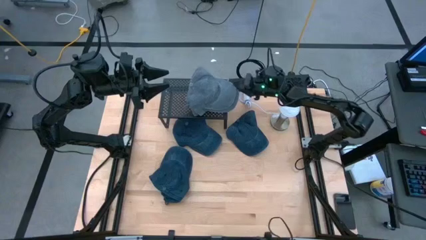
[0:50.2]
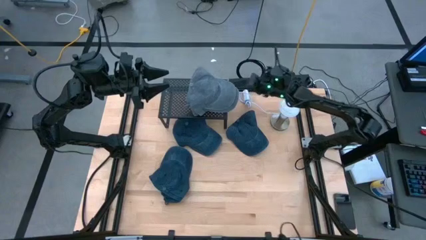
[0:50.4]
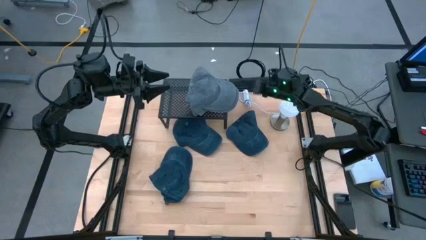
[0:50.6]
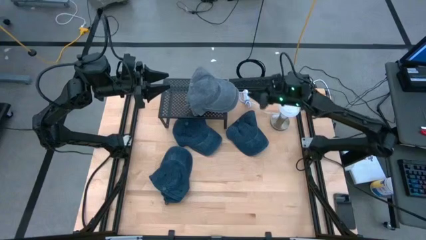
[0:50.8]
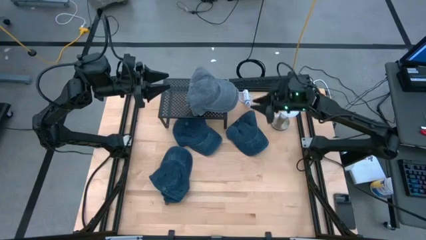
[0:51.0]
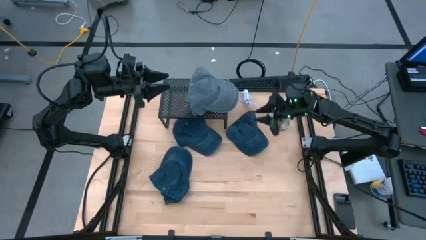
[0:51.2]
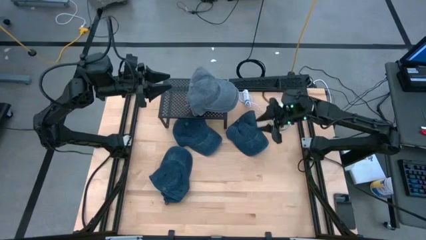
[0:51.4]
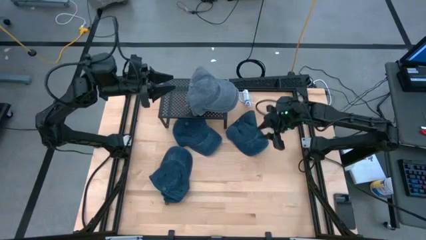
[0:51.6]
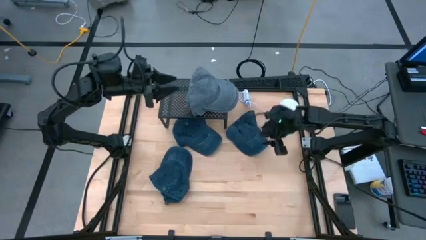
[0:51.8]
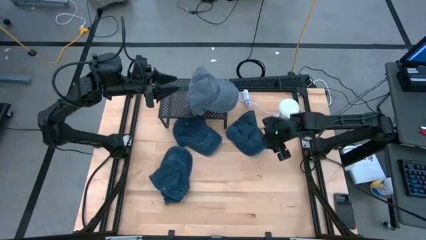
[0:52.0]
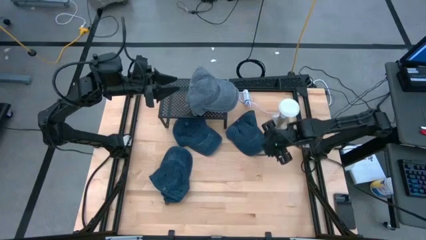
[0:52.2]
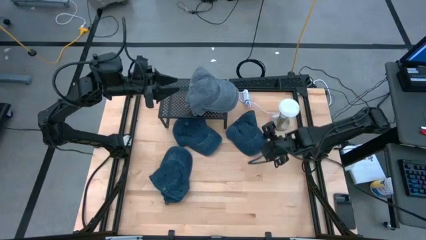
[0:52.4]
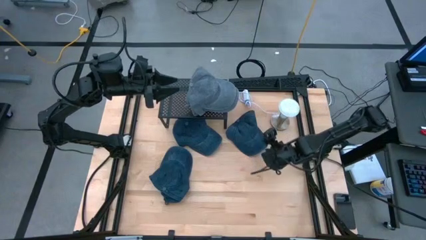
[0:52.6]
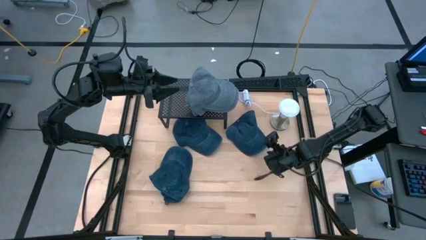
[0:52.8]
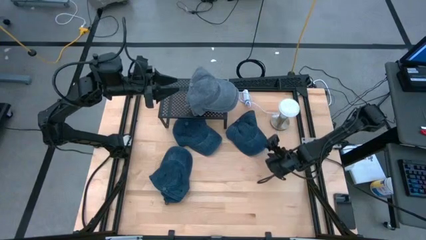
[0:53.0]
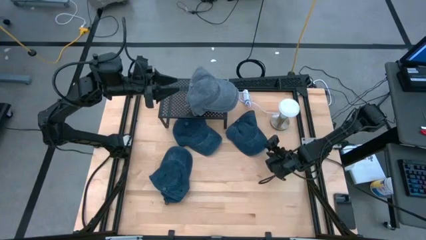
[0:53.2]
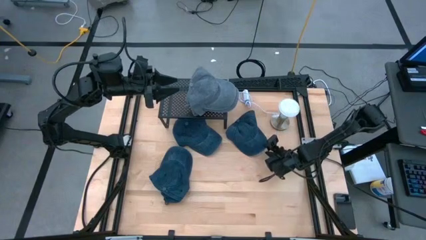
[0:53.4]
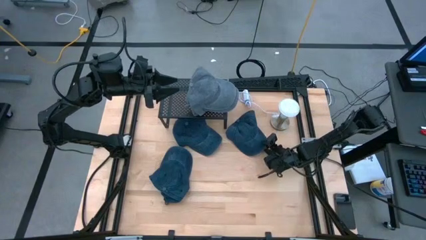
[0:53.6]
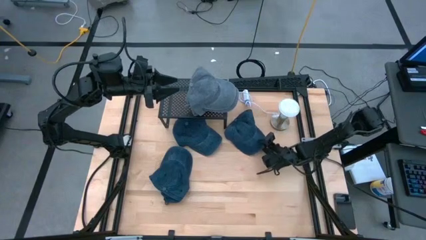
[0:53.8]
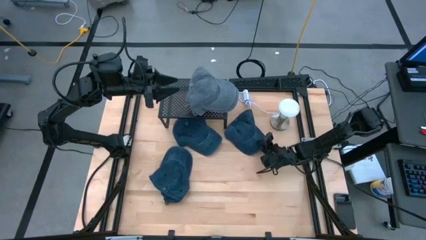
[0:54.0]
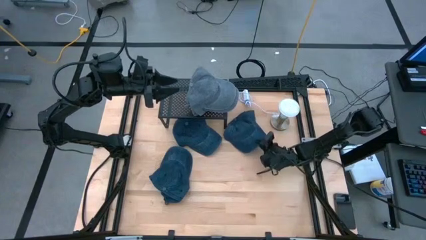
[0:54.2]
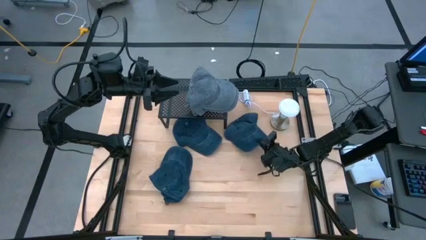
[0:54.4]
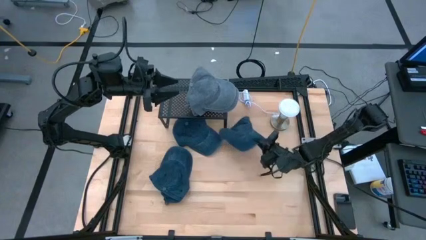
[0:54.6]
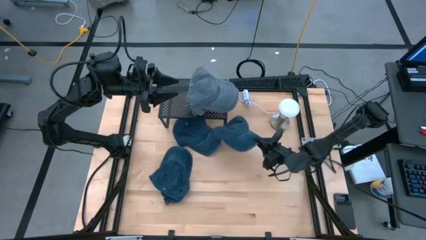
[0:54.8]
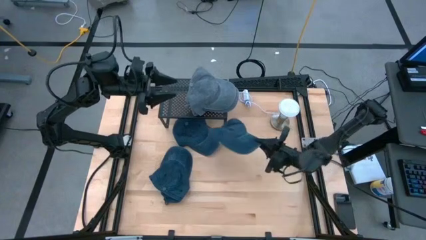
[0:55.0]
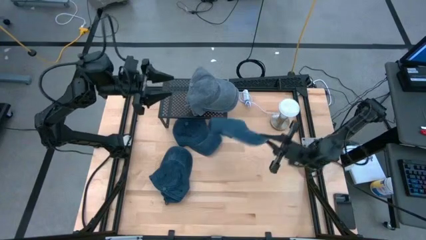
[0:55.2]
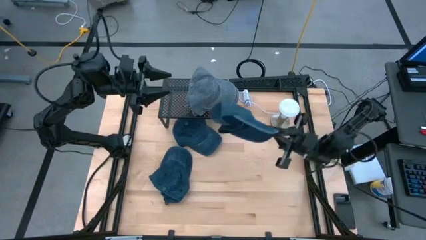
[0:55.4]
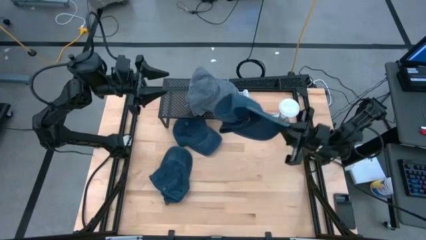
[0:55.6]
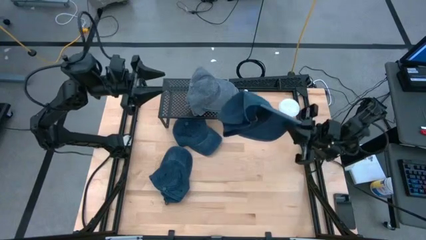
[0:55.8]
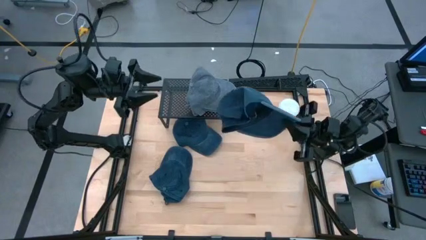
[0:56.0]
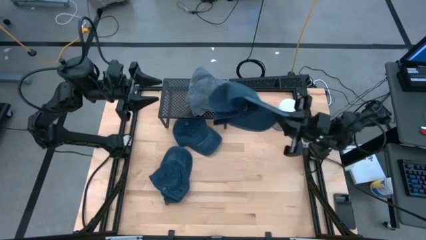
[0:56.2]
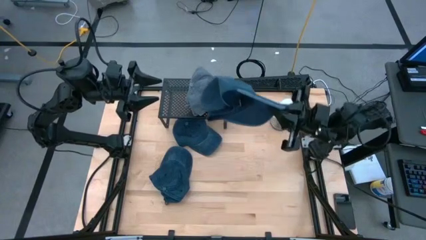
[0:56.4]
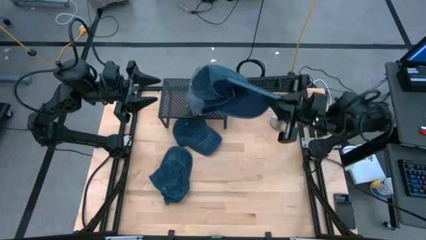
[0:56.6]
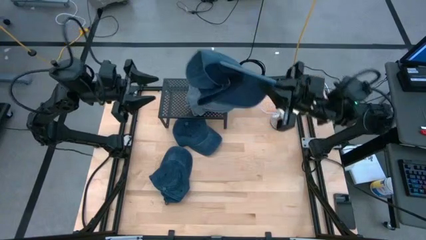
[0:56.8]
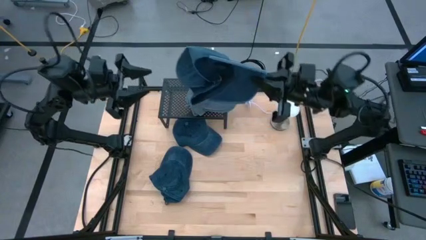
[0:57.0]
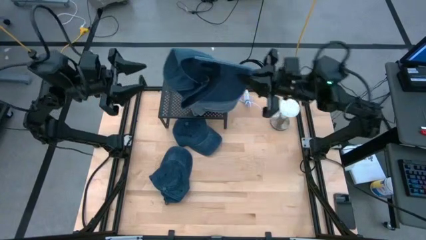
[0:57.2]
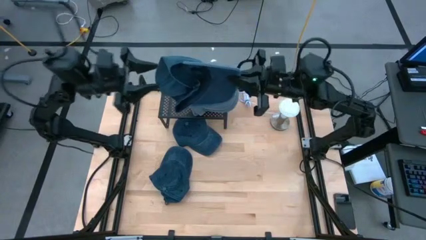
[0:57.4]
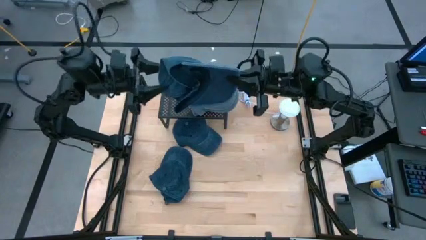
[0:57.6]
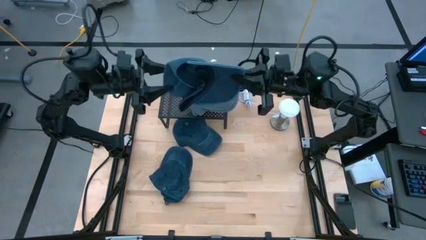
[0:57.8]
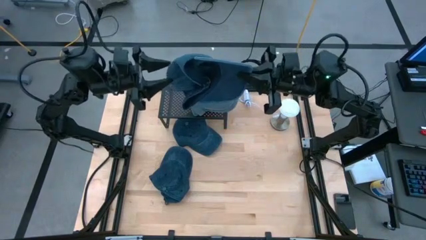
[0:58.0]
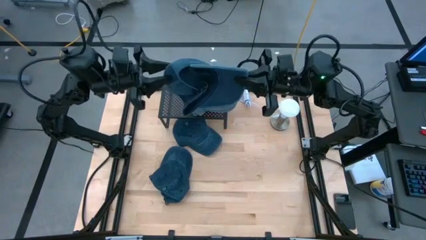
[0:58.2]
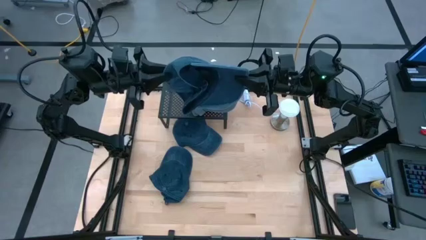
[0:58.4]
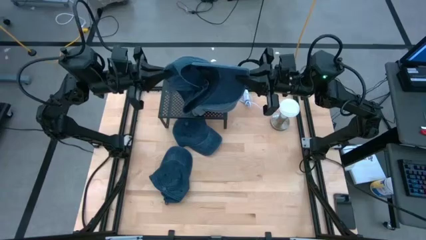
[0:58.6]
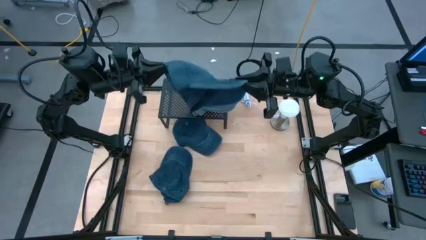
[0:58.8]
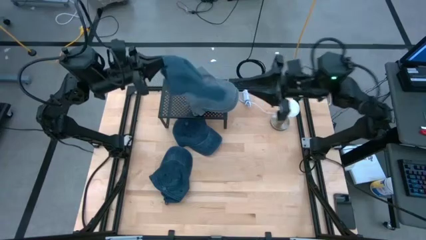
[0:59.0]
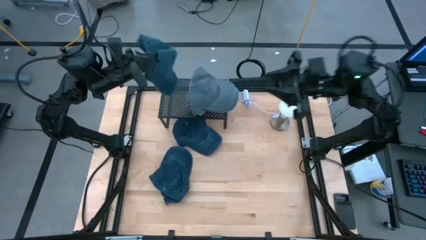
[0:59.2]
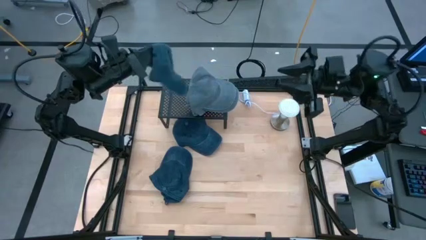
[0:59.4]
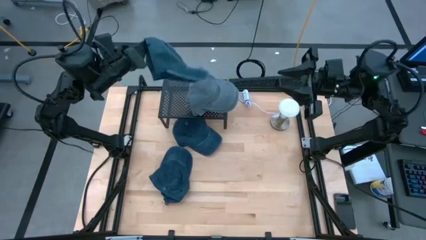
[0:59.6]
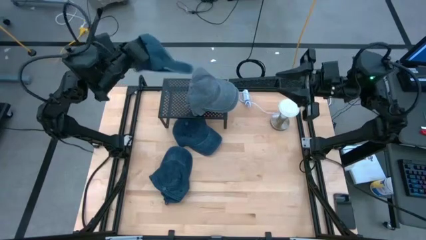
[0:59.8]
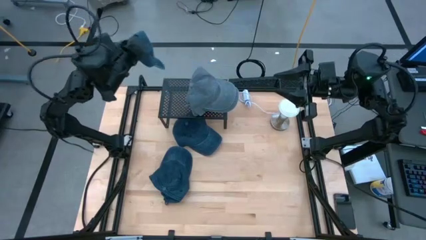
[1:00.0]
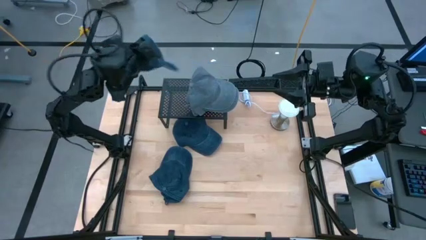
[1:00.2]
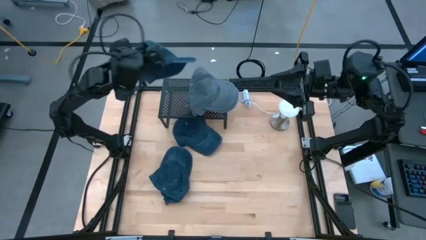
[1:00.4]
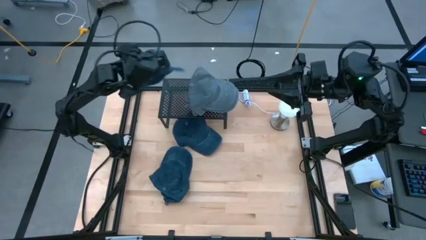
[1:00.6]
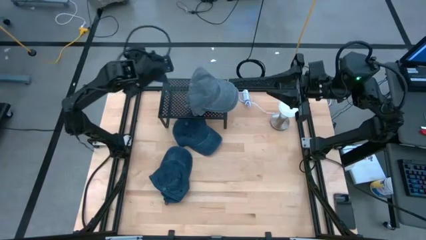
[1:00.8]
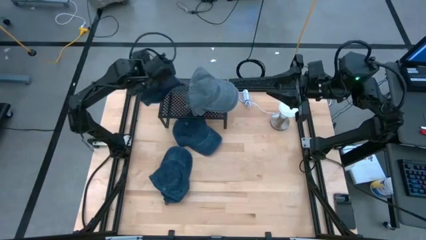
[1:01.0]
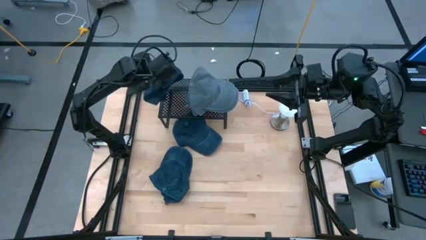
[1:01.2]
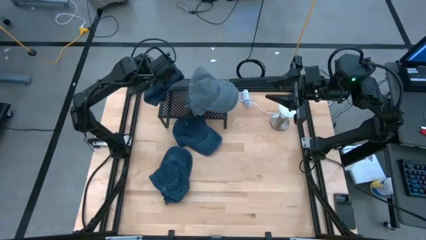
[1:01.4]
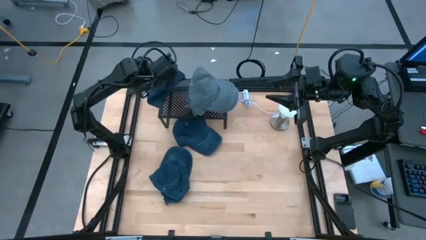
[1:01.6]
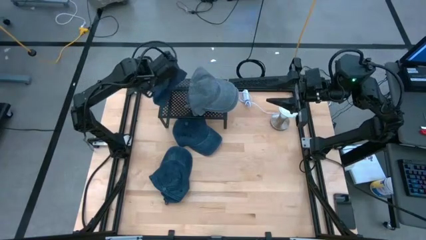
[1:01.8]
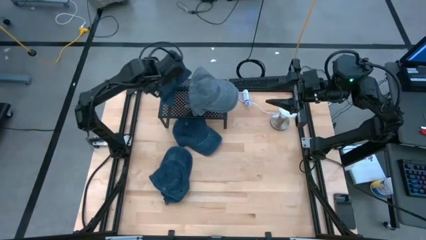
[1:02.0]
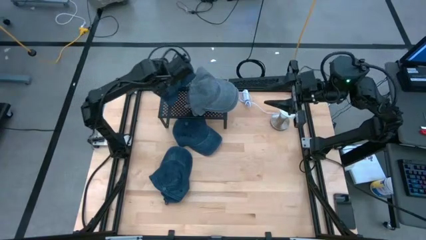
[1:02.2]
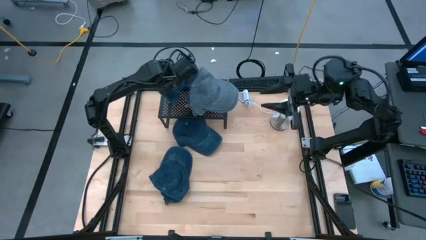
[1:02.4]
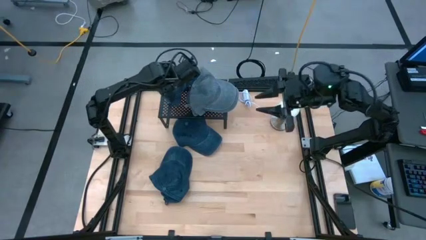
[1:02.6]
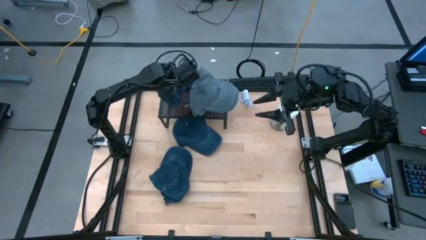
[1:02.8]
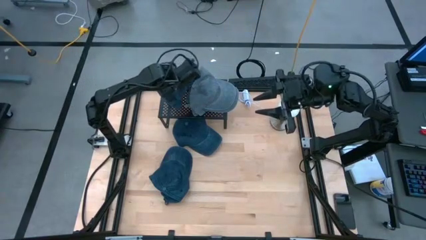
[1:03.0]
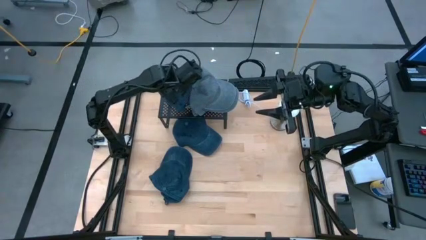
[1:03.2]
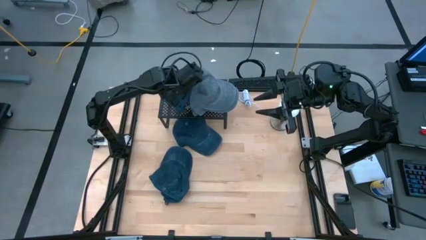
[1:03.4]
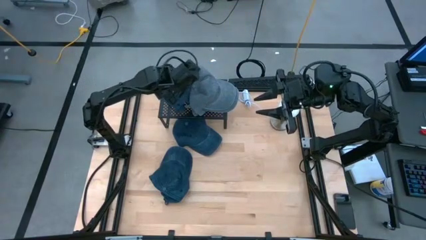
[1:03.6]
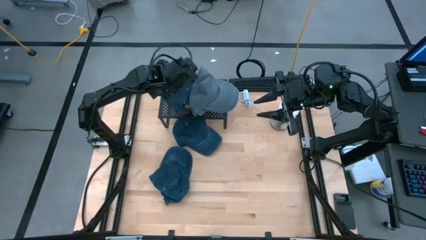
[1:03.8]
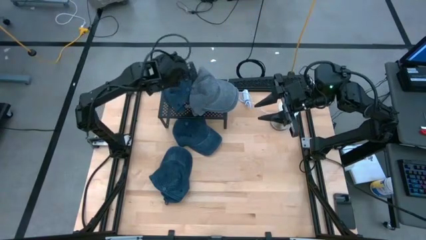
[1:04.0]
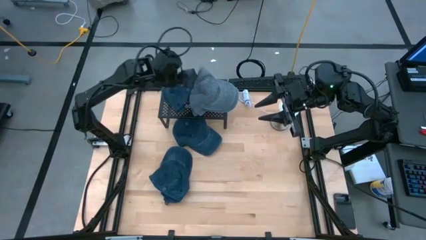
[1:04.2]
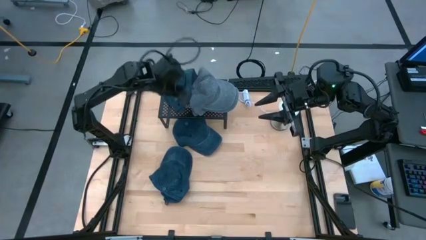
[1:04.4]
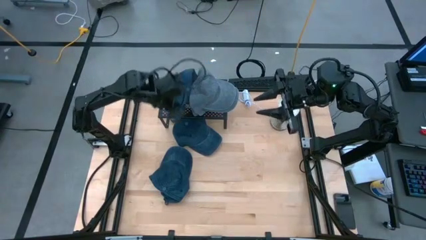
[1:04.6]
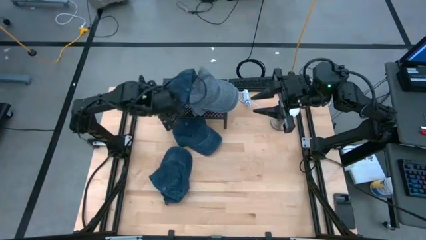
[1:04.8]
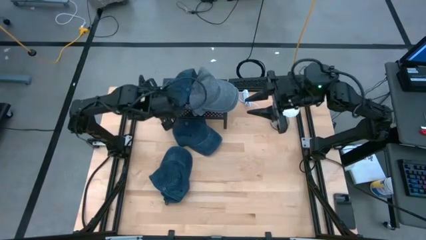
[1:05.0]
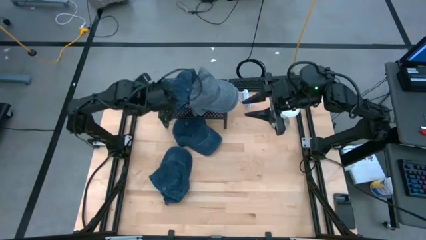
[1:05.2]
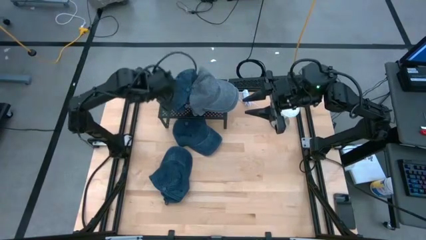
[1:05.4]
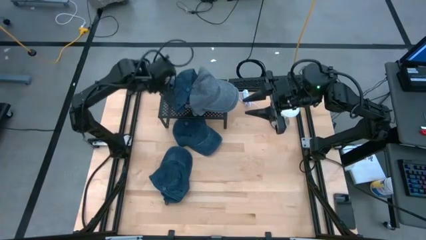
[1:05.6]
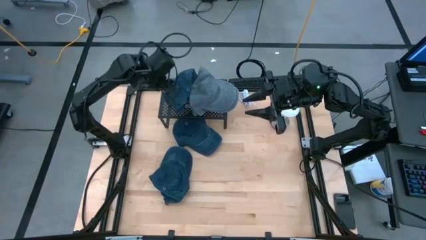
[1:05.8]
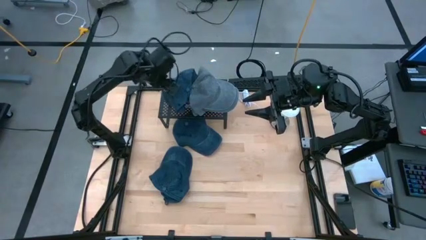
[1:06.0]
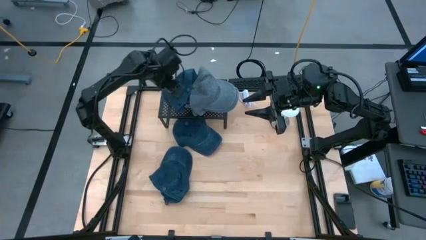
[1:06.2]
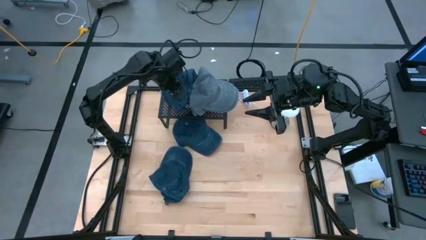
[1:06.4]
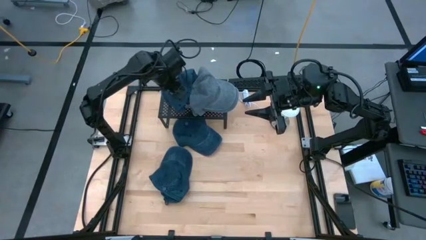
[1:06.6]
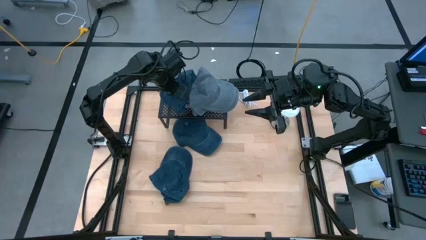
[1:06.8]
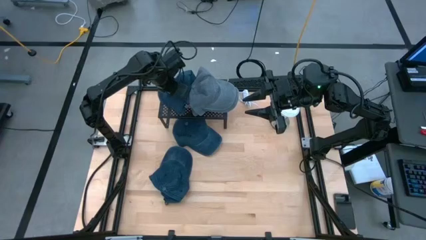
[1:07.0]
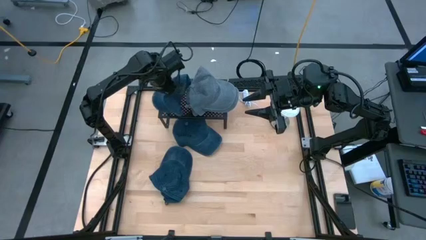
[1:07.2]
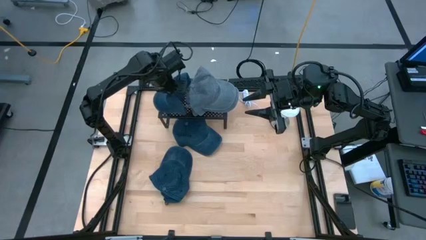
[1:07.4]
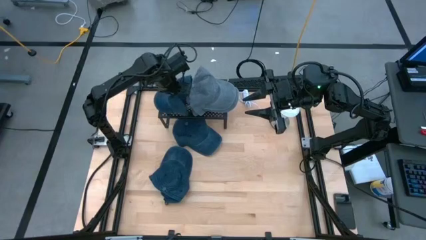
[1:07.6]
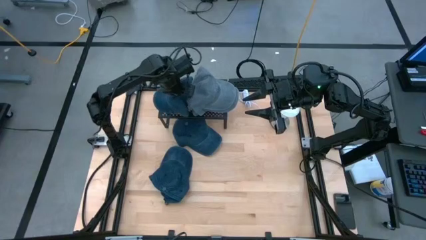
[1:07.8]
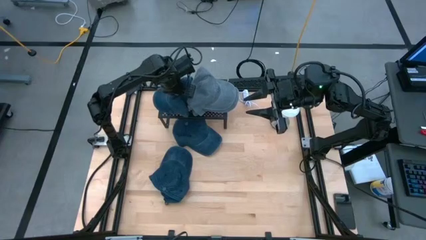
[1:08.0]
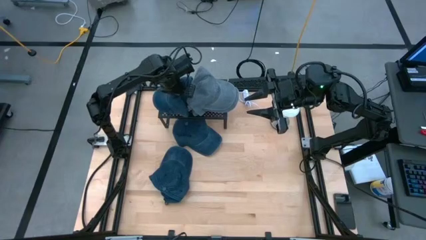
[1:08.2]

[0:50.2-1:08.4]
Task: Pick & Place hat
Put the top right dark blue cap on the left side of the shelf
